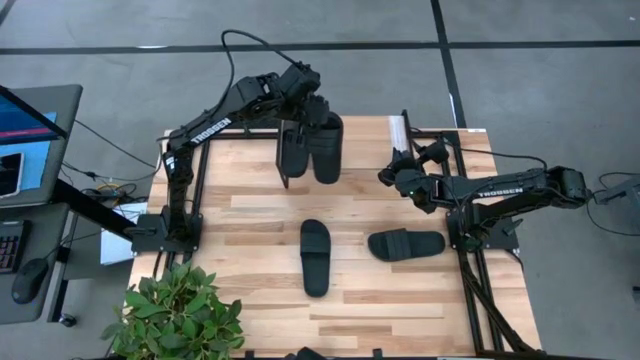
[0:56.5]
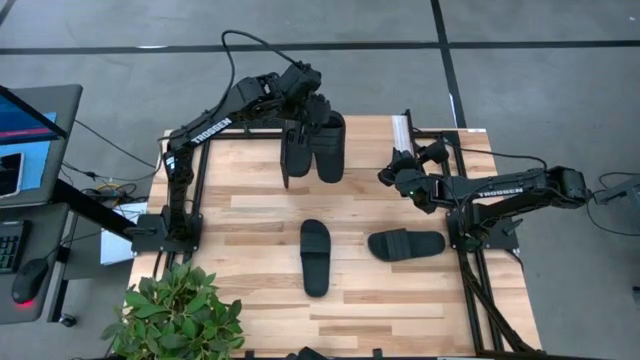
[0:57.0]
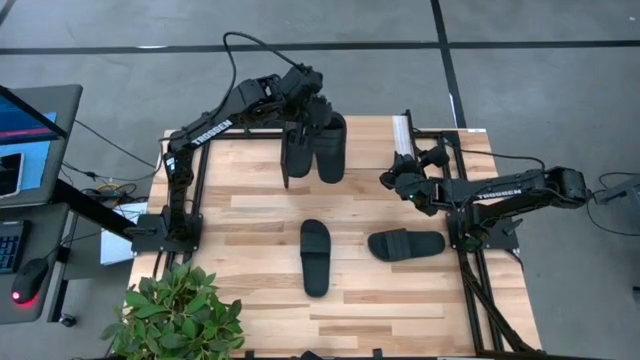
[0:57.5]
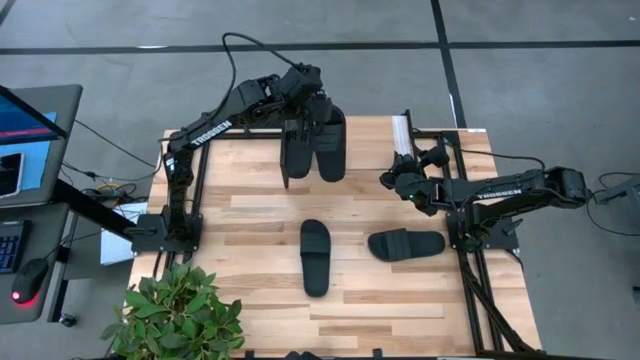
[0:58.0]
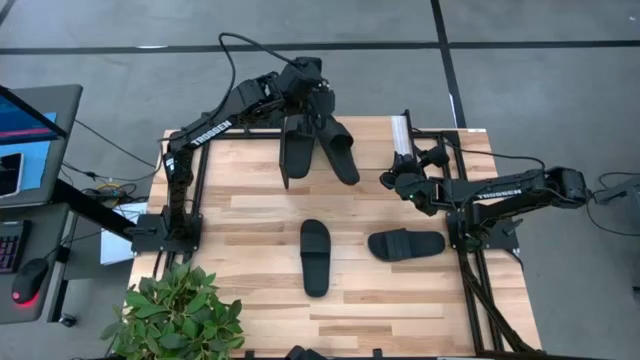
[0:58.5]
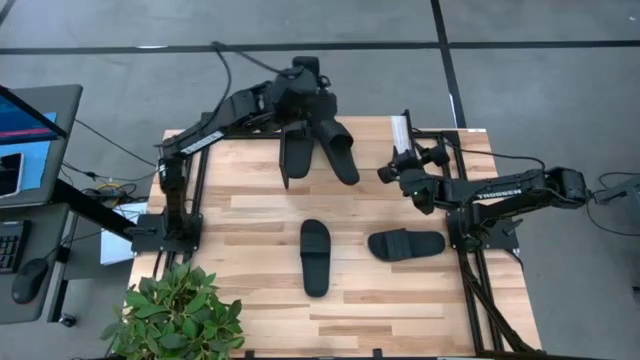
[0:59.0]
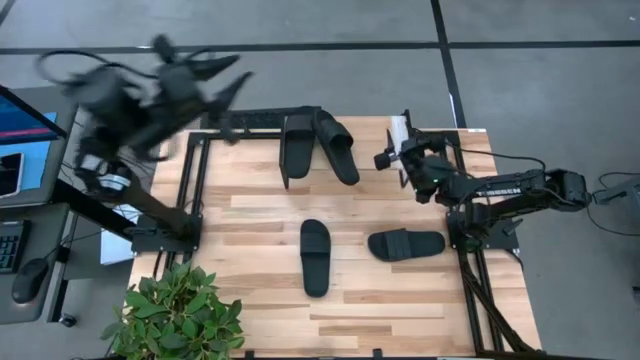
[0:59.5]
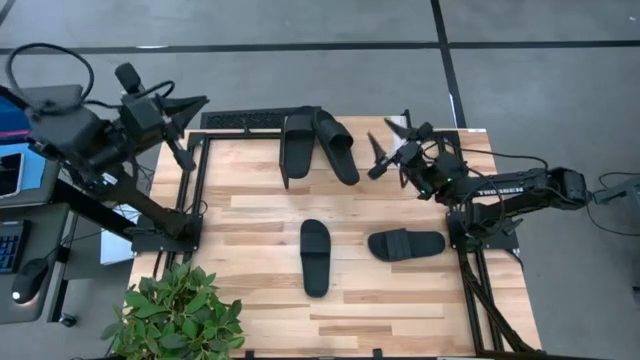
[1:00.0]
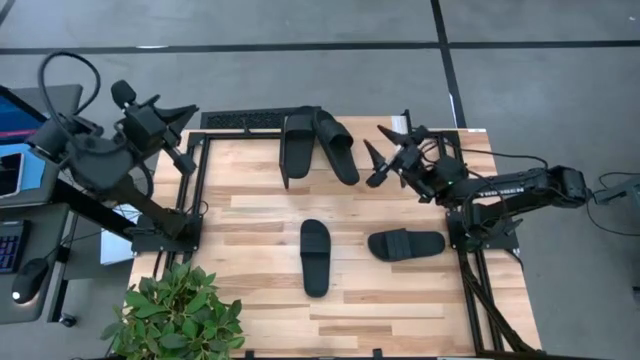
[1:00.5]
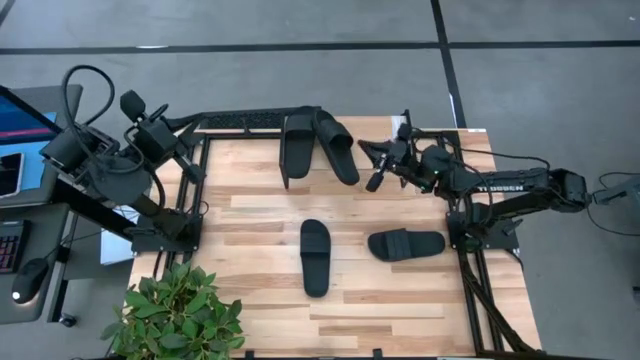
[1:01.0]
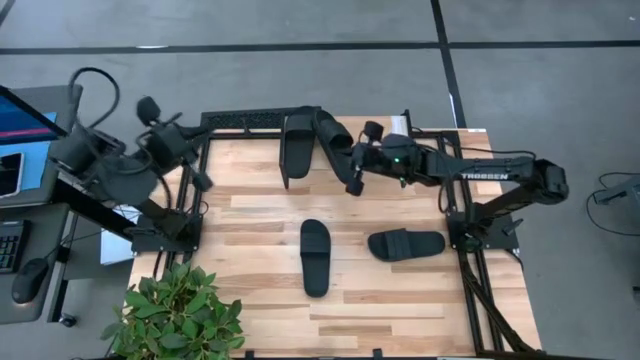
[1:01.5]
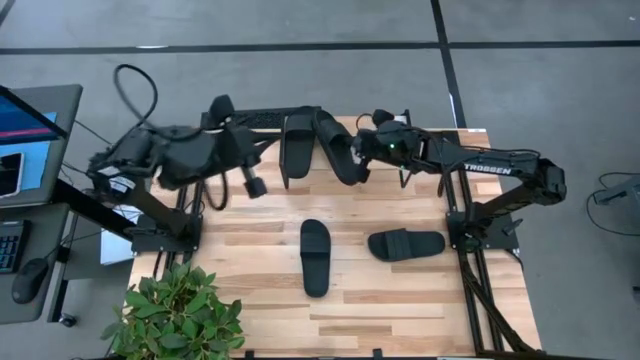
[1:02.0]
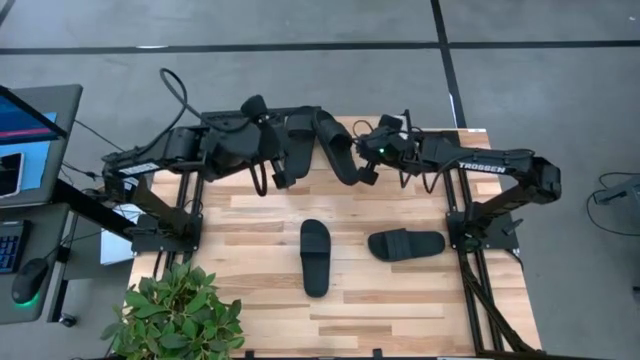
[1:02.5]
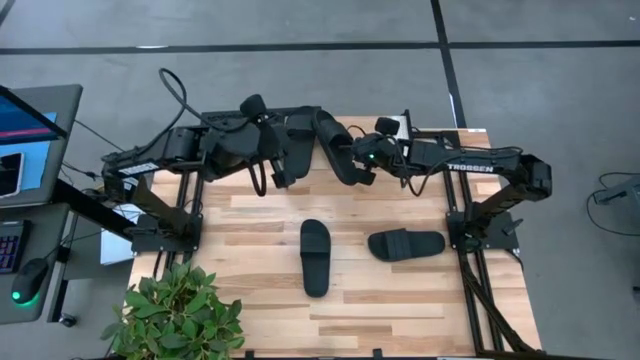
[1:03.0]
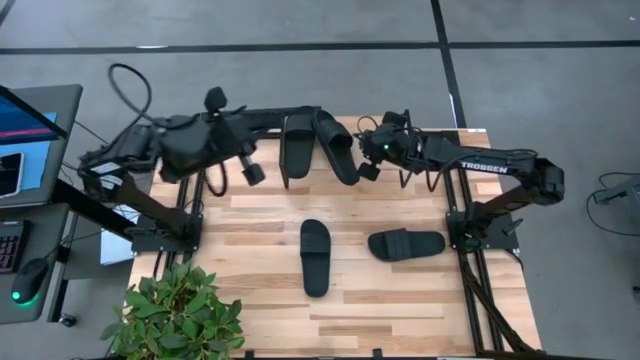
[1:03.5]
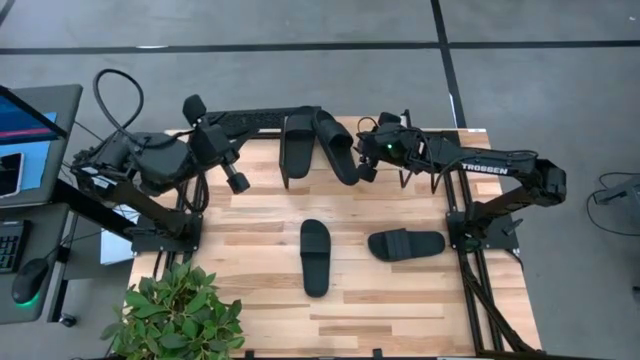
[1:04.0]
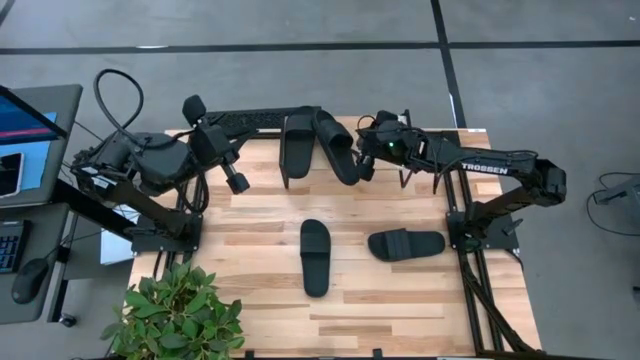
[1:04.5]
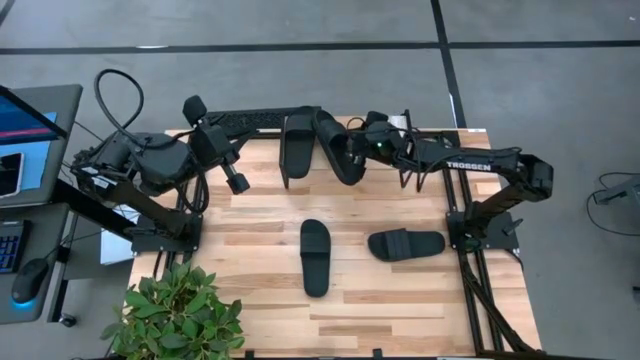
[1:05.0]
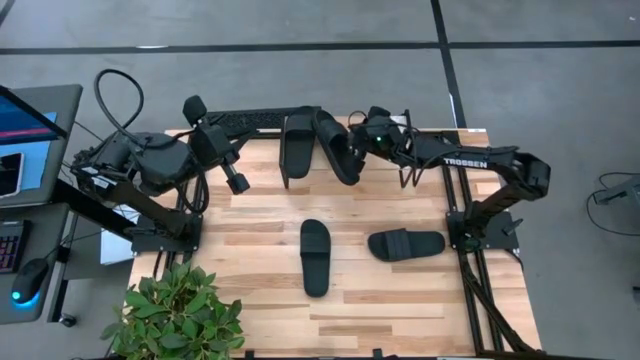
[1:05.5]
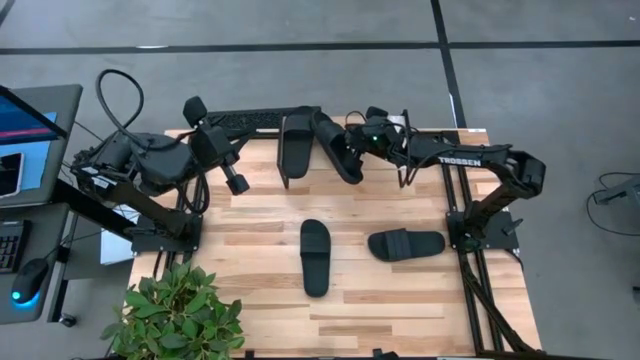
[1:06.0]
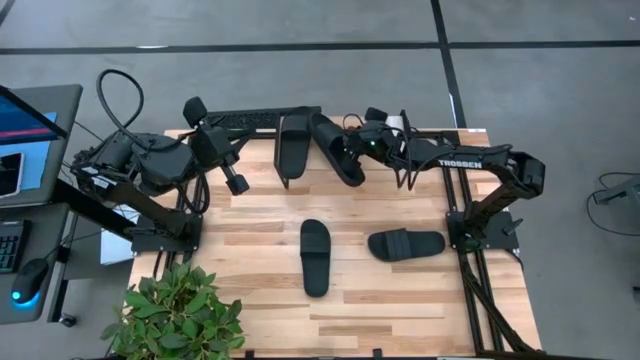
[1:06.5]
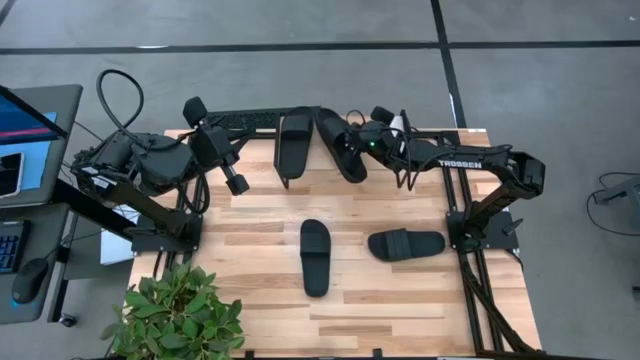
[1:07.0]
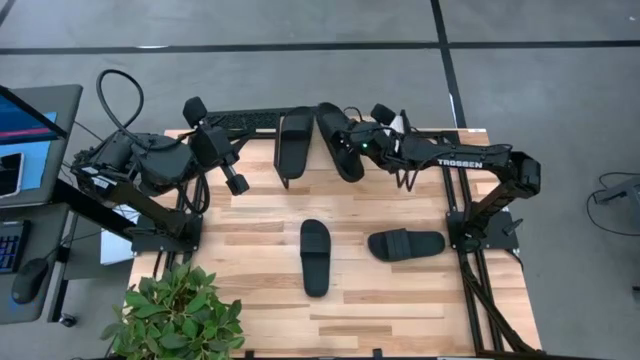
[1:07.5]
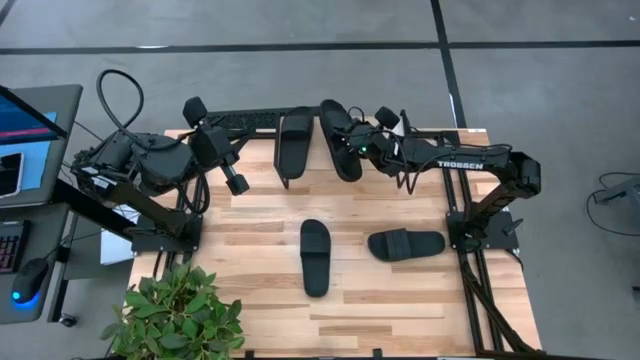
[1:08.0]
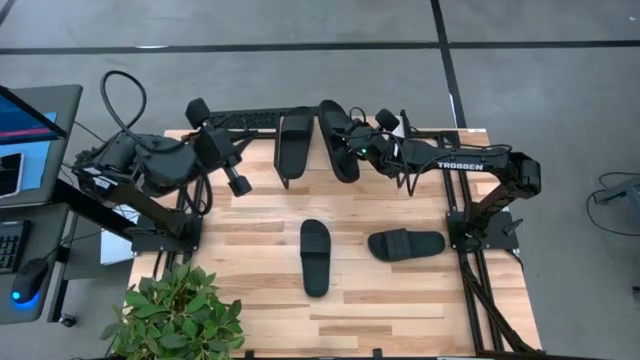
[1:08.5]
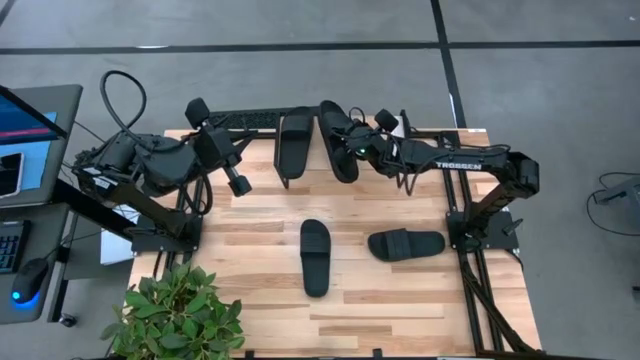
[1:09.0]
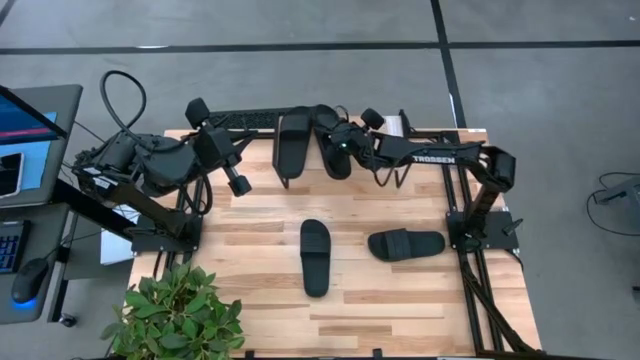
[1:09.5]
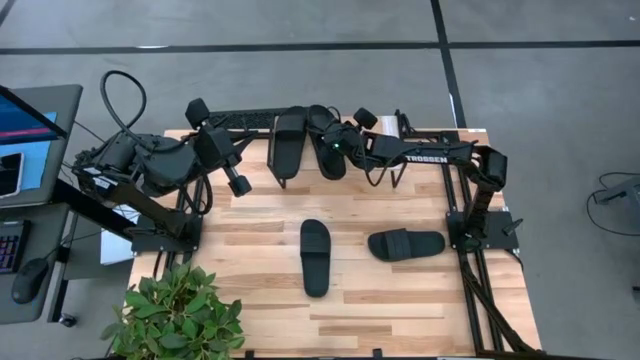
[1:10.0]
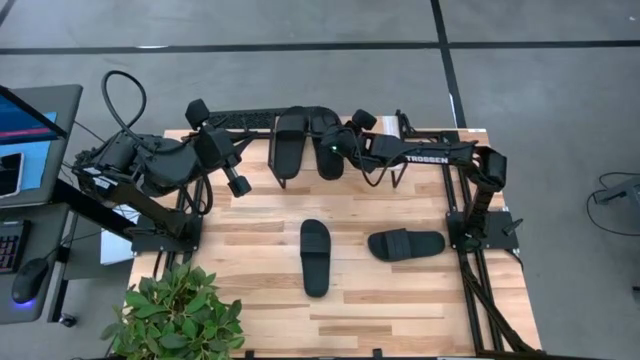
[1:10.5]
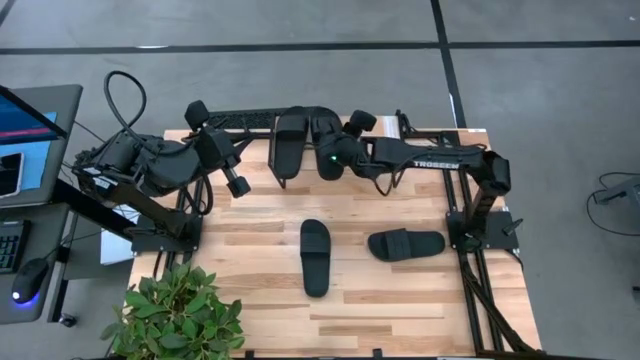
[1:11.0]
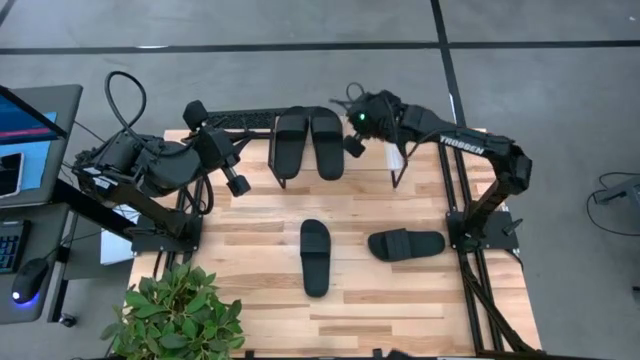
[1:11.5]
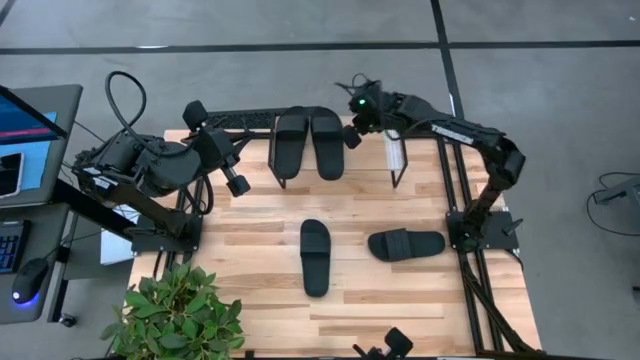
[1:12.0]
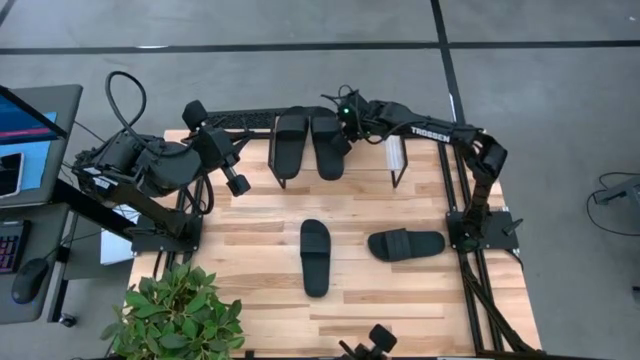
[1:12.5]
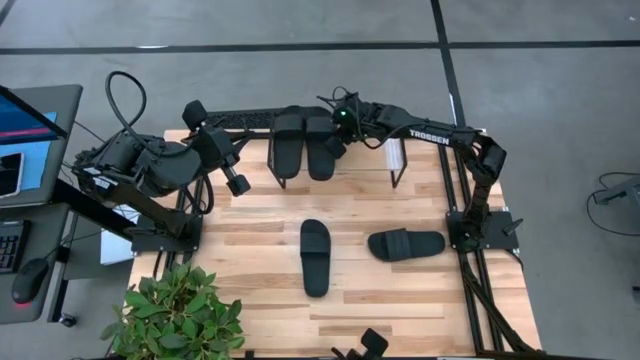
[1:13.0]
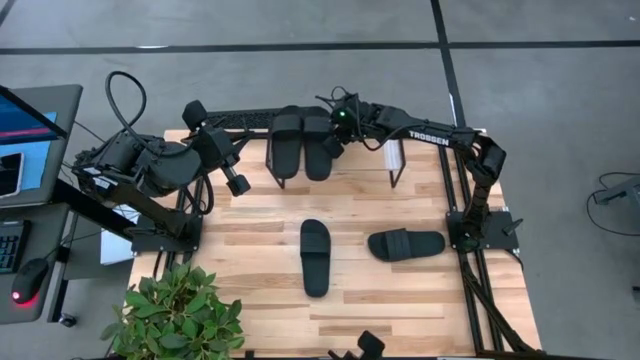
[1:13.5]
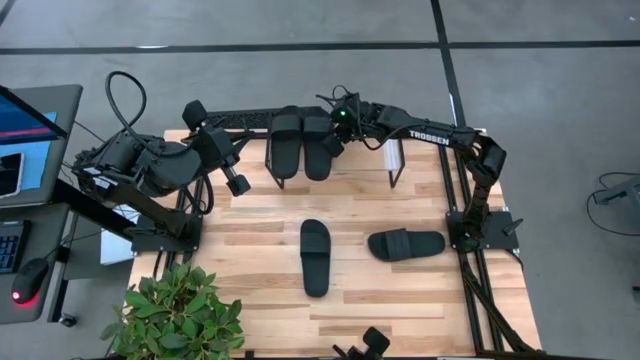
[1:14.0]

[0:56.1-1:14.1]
Task: Pick and place slides into the shelf
Put the black slide on the shelf

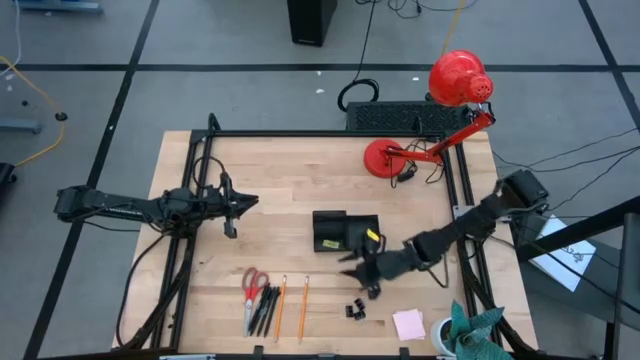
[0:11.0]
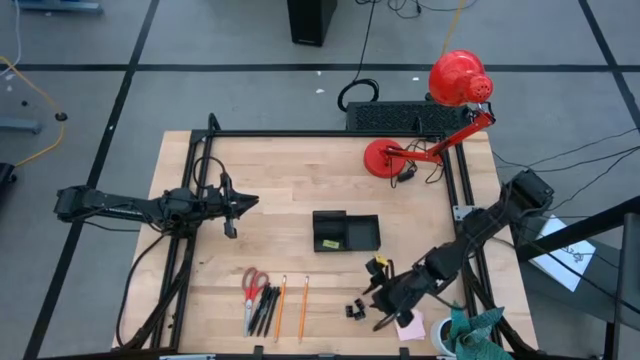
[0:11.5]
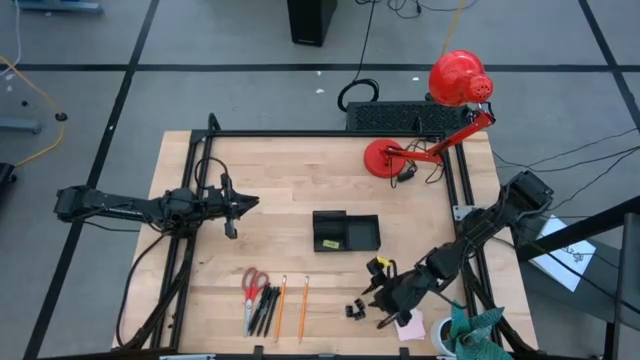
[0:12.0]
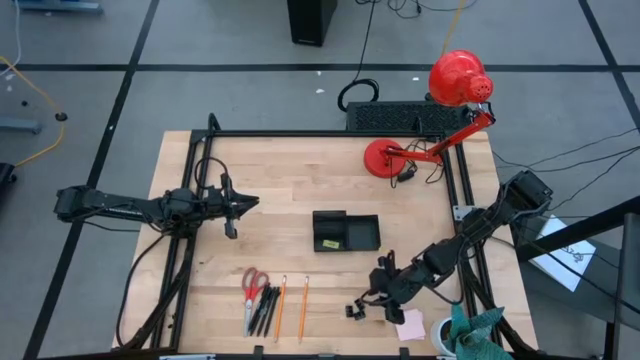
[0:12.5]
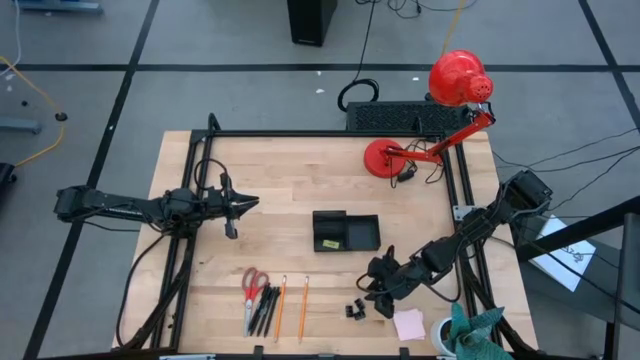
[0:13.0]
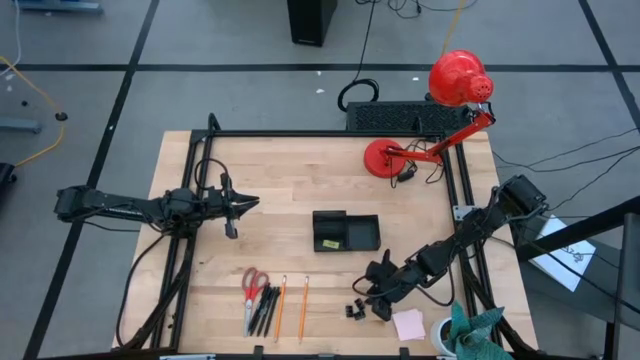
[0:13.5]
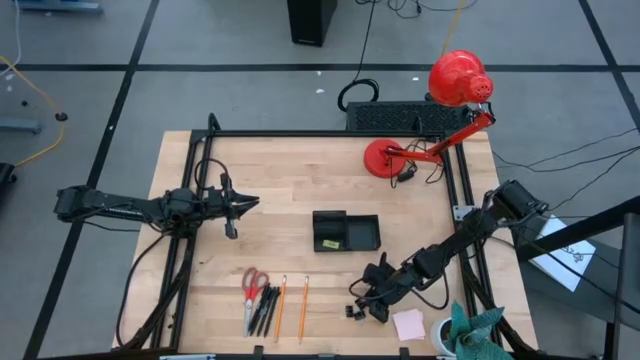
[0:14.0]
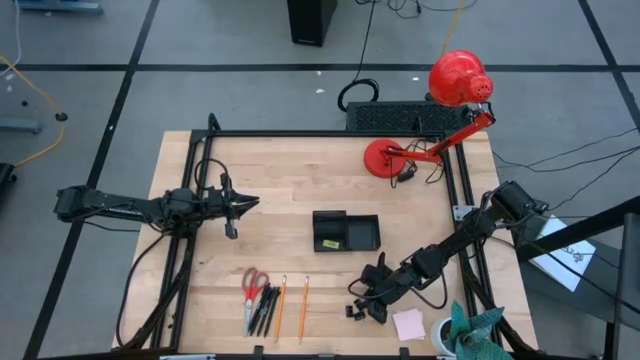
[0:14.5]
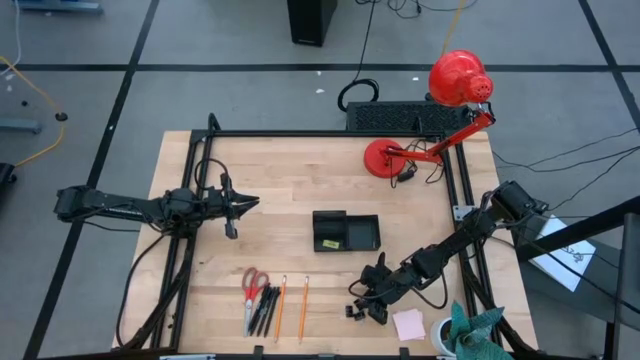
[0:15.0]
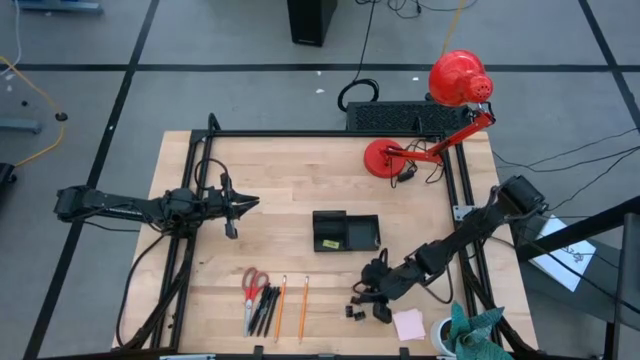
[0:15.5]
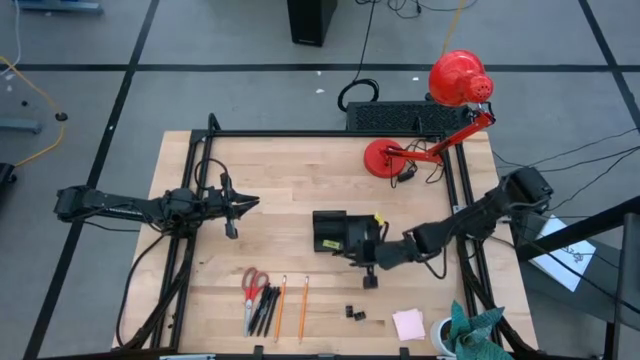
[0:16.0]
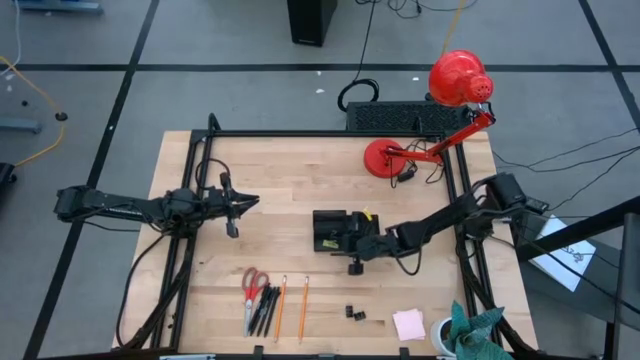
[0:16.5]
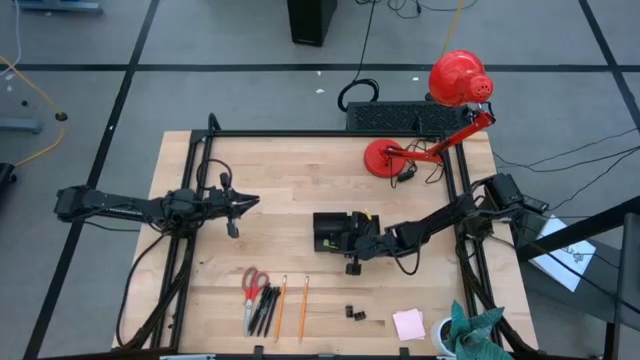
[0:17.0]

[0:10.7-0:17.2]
Task: Pick and place office supplies into organizer
Put the right binder clip into the desk organizer
